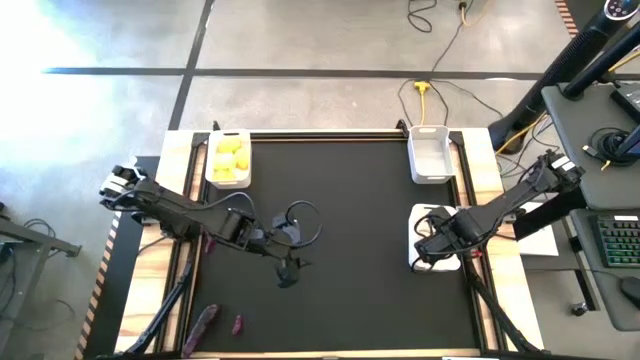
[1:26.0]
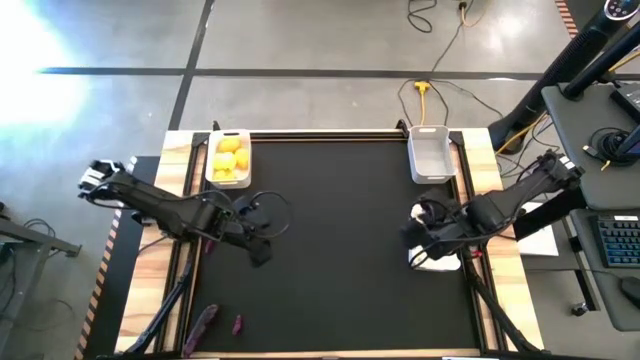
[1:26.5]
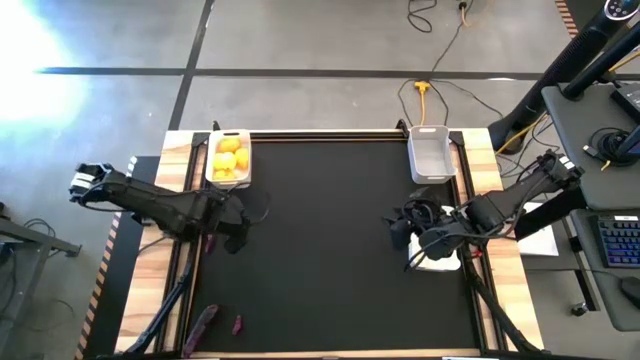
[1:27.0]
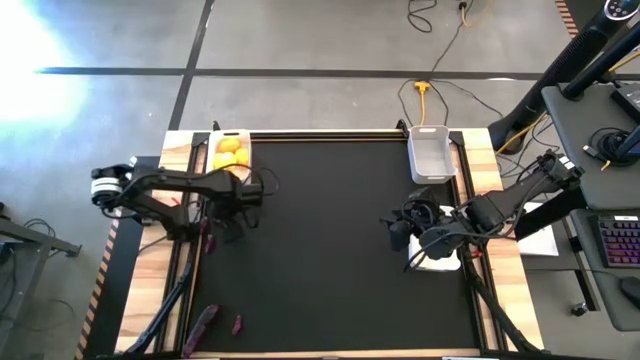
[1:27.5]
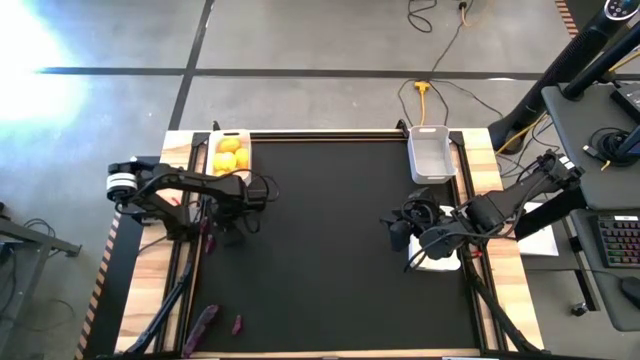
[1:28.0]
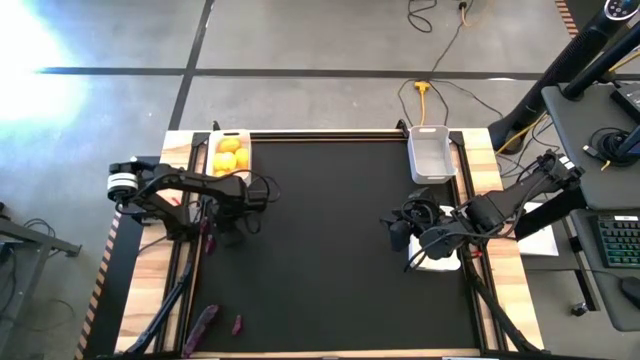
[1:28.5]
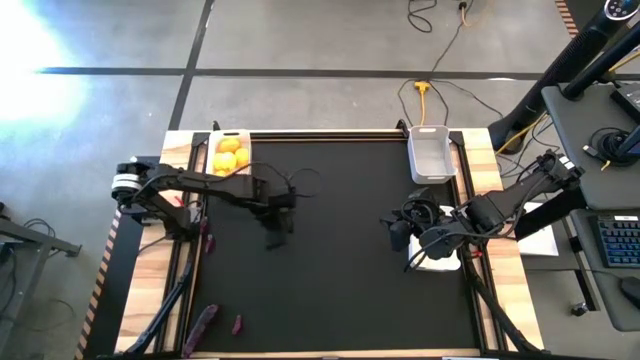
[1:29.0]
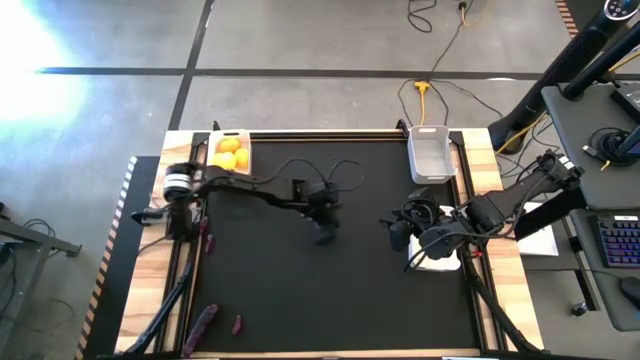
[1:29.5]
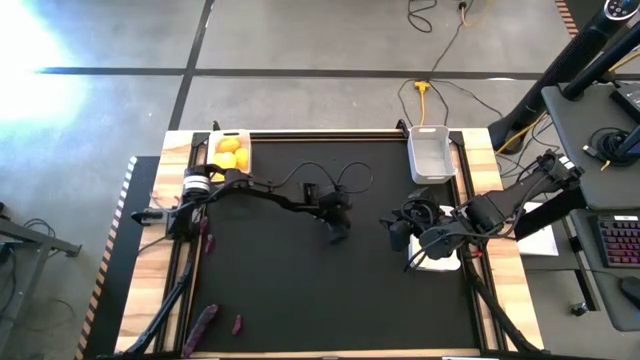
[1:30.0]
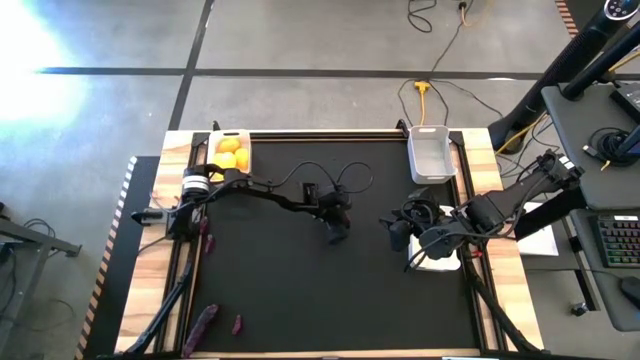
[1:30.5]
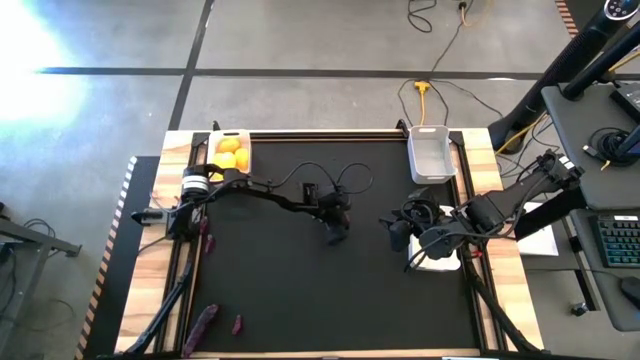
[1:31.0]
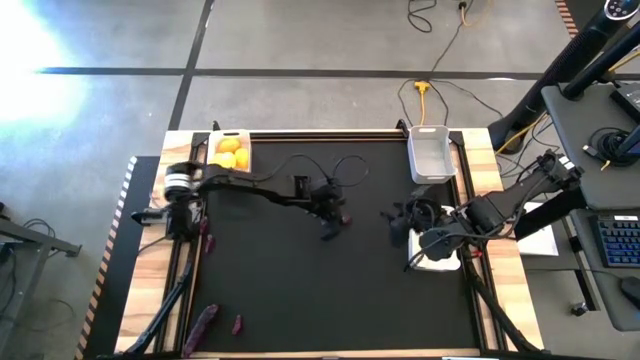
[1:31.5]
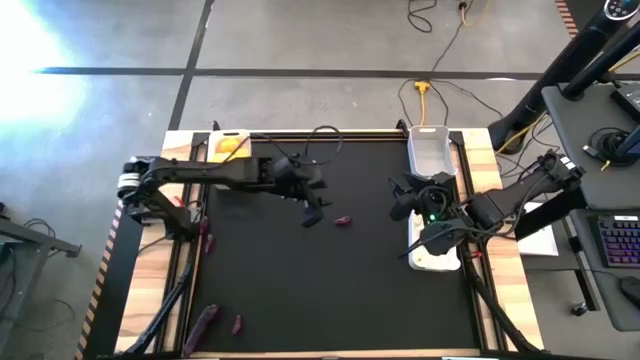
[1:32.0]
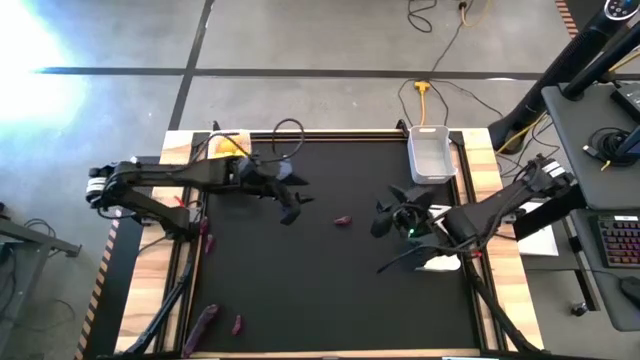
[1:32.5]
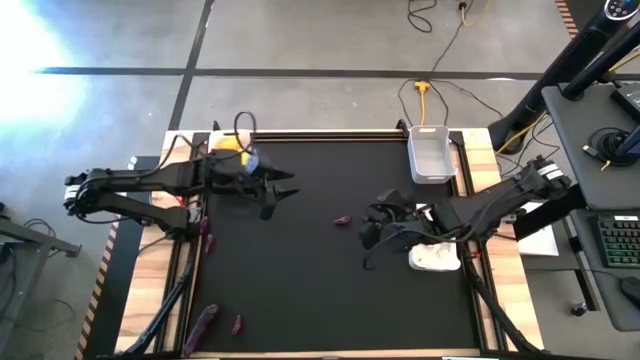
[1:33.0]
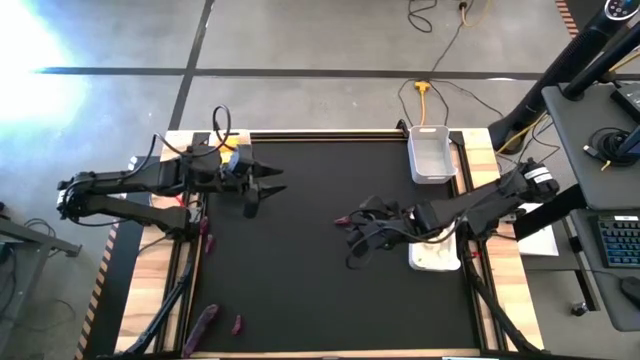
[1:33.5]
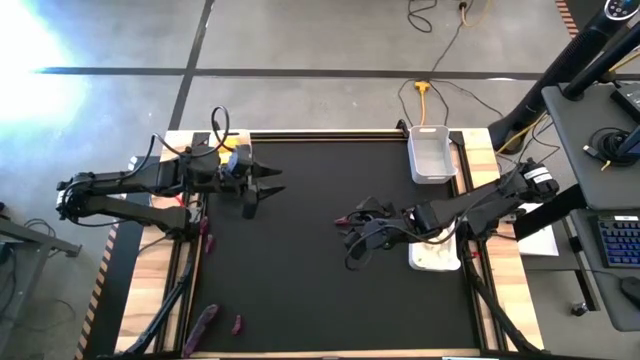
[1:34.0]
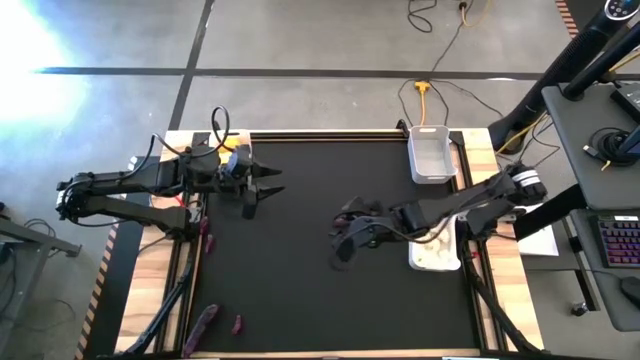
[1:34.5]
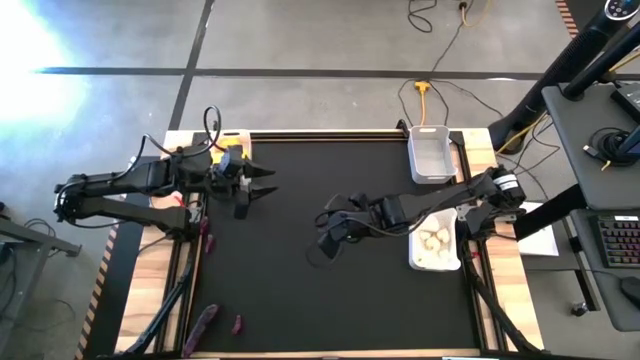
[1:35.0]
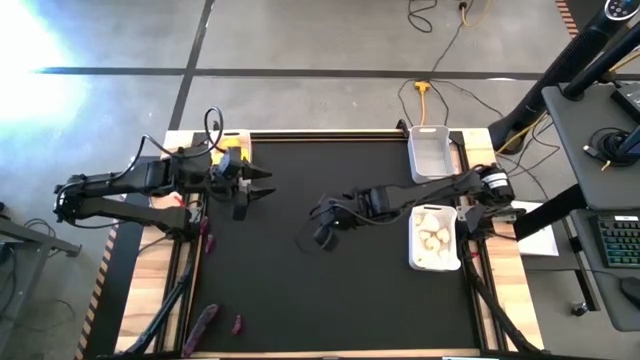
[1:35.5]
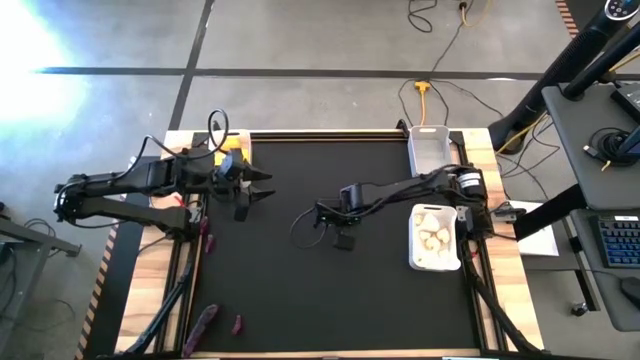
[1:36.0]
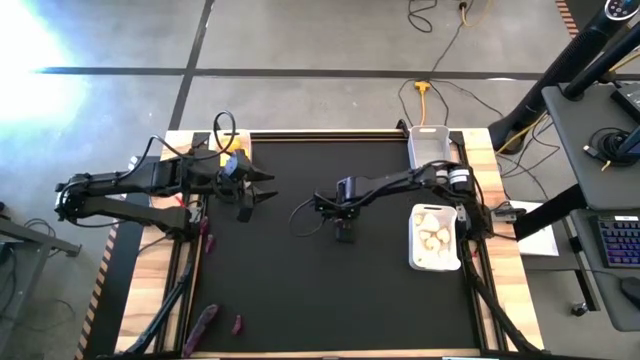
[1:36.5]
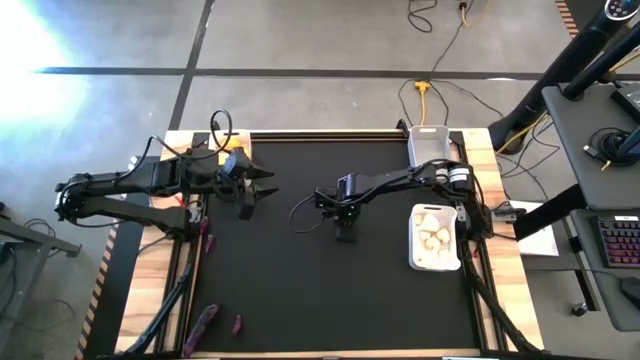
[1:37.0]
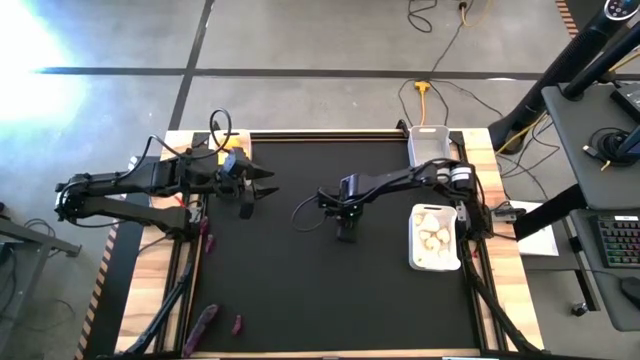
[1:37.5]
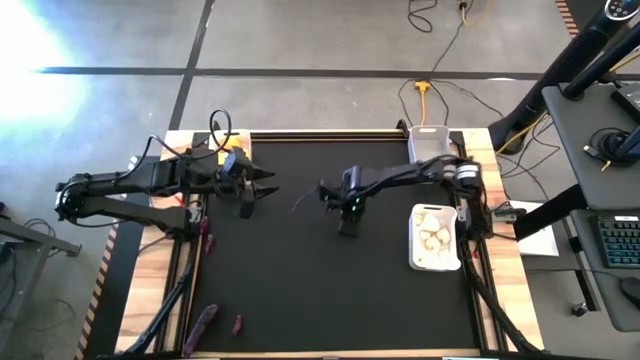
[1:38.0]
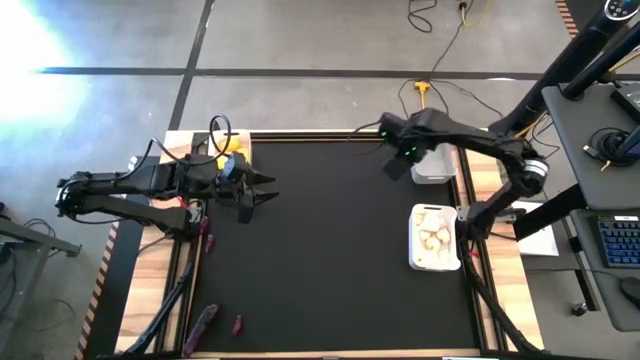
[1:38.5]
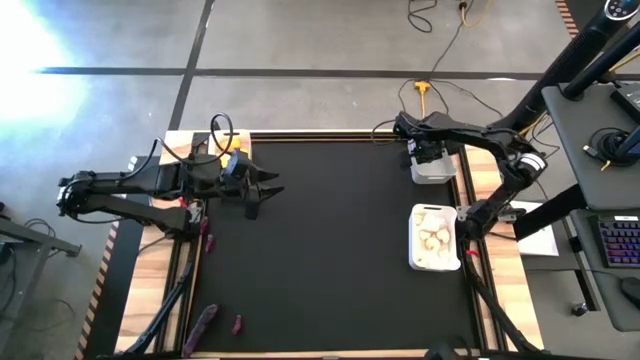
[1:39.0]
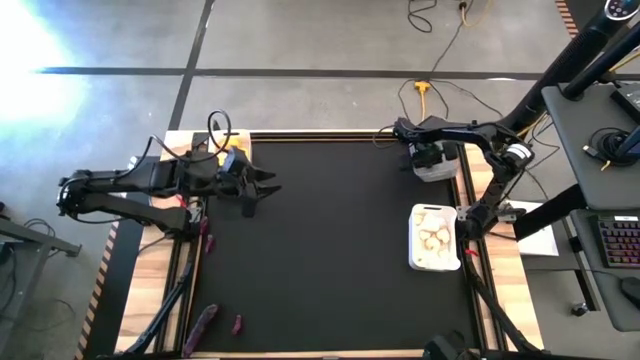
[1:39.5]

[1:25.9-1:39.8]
Task: Sort produce into baskets
Put the purple eggplant into the gray bin

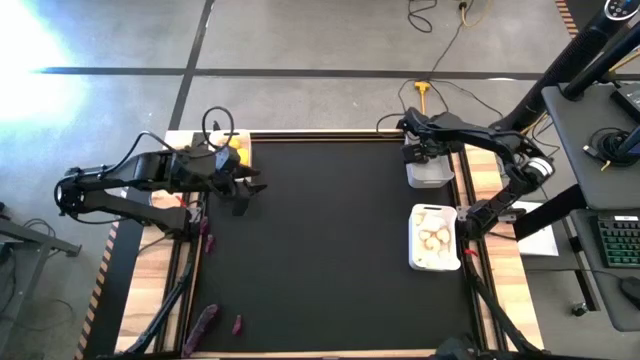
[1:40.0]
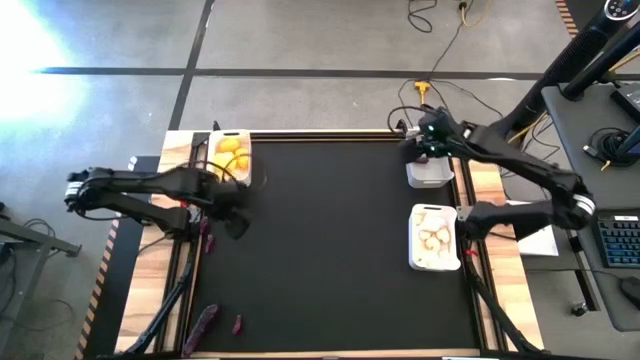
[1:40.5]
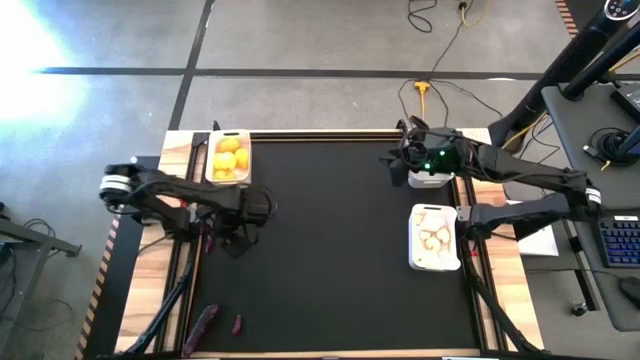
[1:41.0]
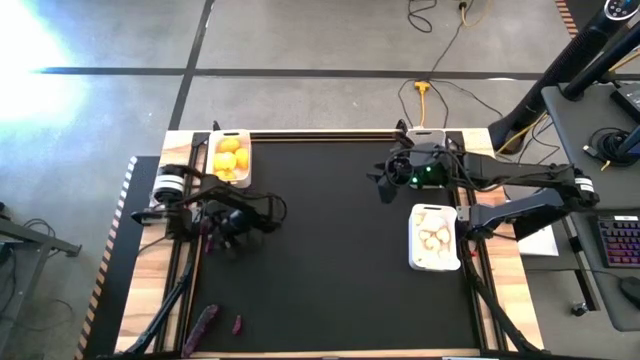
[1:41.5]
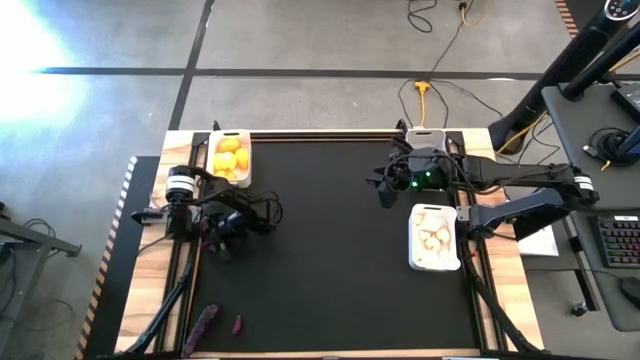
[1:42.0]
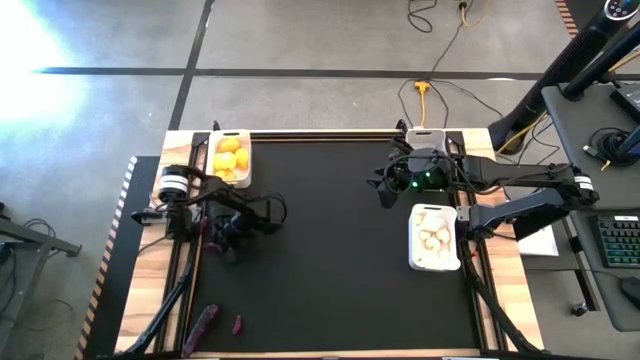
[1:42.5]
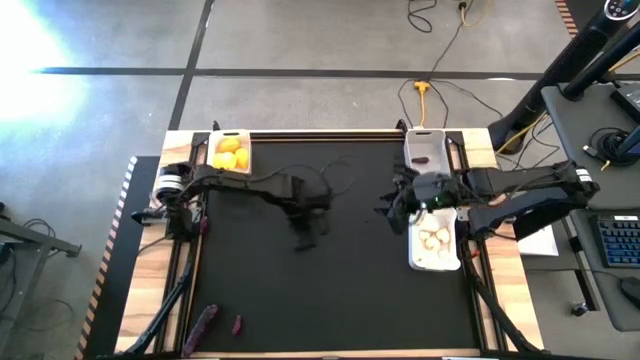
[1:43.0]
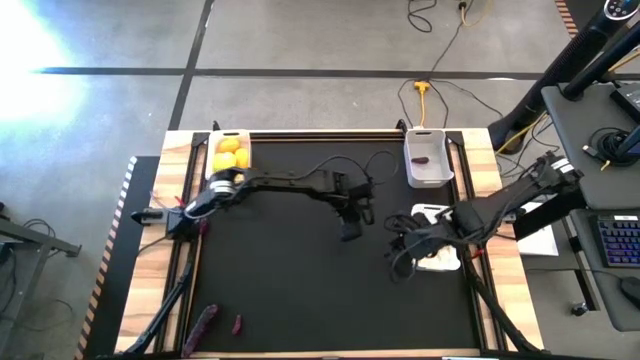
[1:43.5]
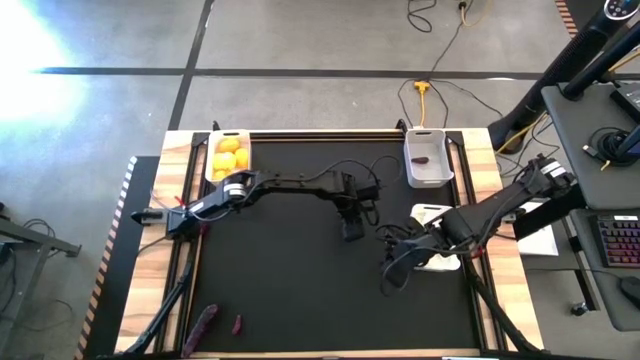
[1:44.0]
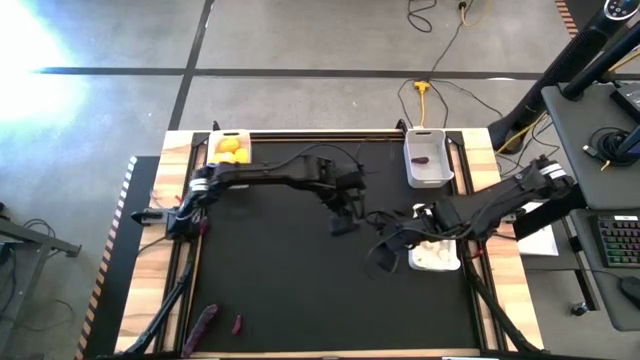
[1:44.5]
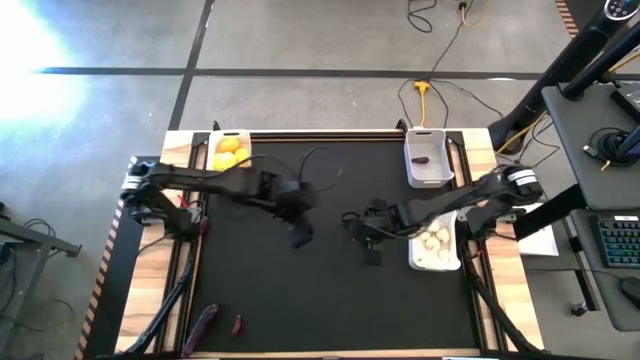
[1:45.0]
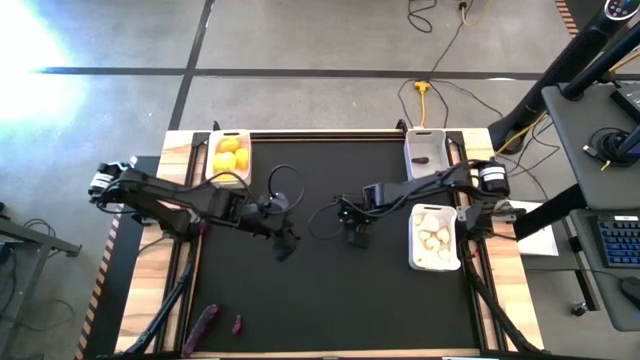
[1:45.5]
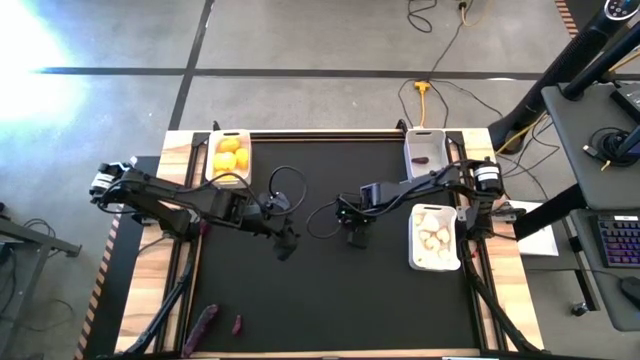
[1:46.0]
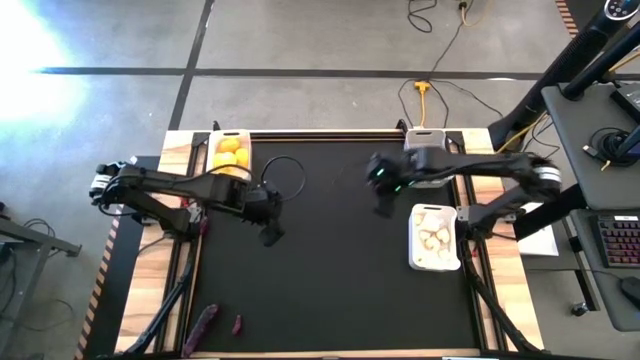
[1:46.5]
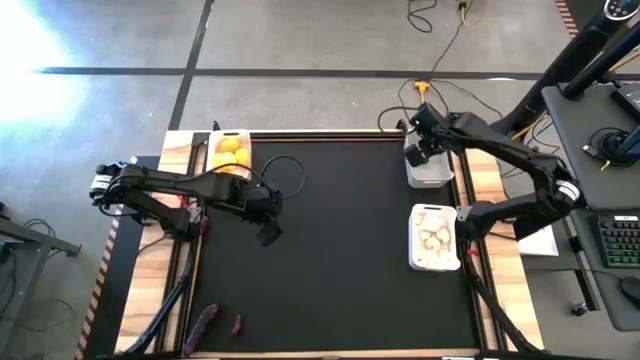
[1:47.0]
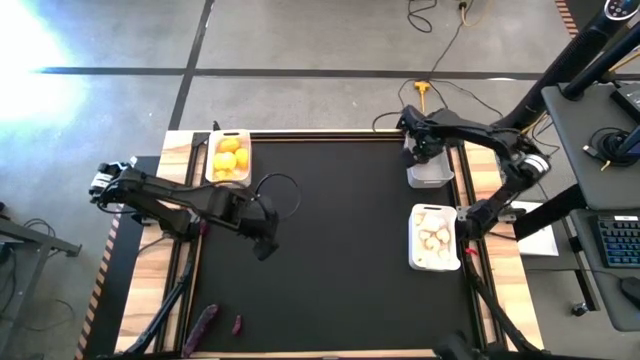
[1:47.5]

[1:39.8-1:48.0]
Put the purple eggplant into the gray bin
